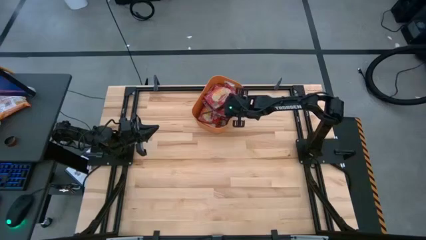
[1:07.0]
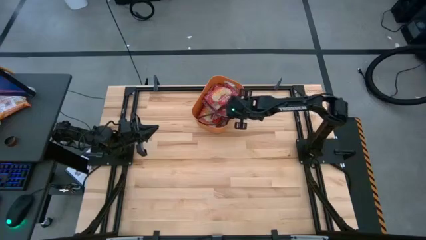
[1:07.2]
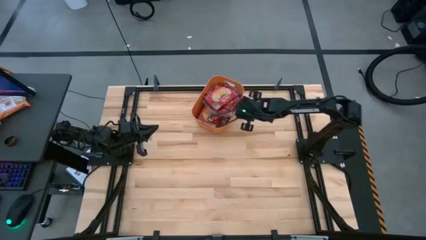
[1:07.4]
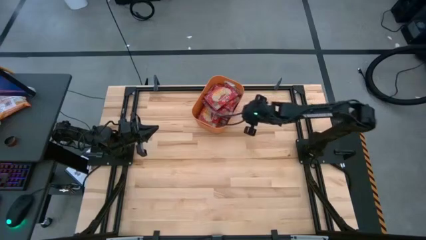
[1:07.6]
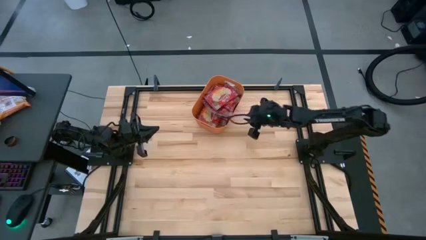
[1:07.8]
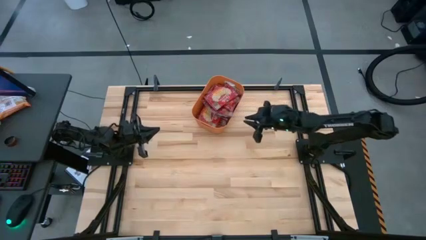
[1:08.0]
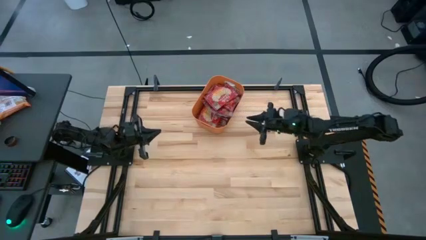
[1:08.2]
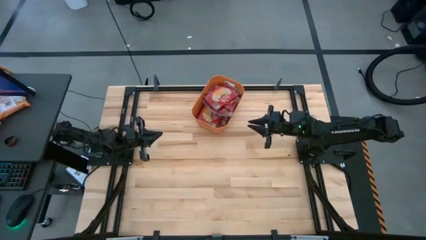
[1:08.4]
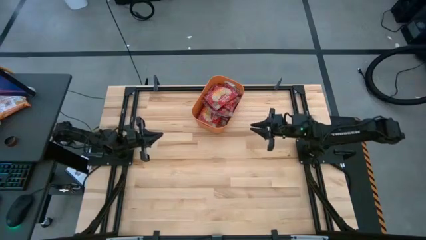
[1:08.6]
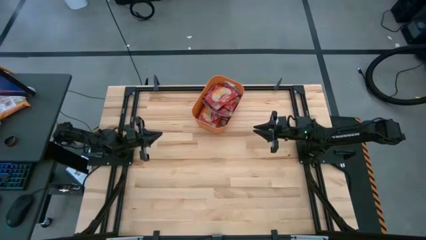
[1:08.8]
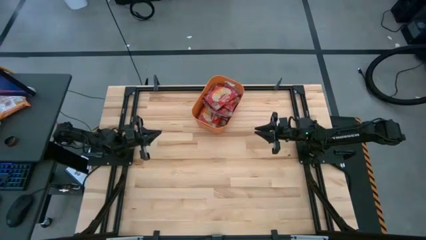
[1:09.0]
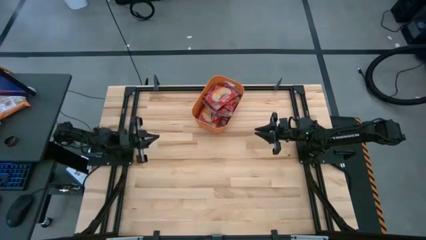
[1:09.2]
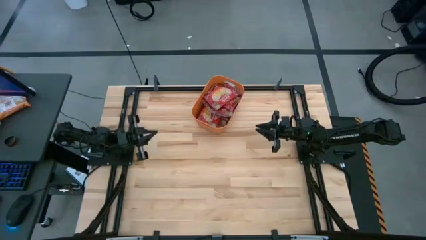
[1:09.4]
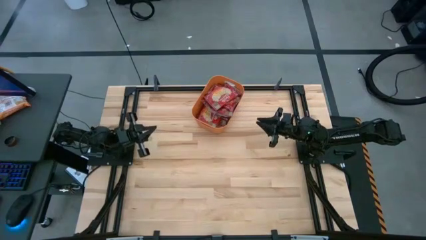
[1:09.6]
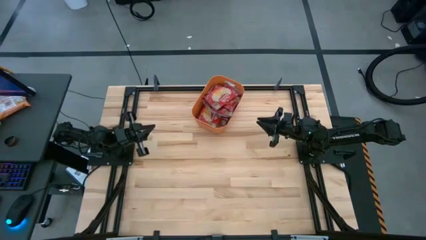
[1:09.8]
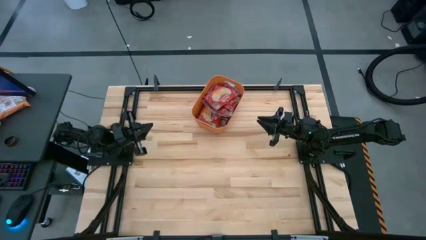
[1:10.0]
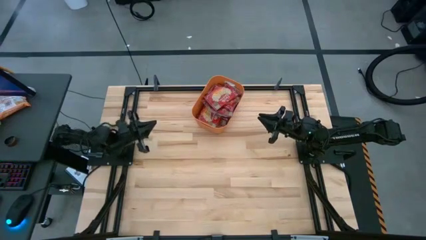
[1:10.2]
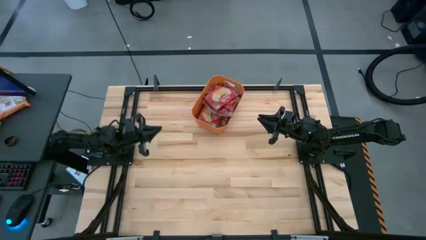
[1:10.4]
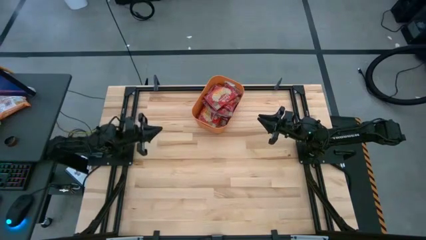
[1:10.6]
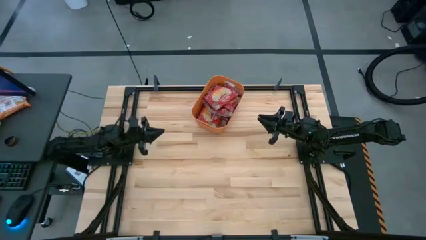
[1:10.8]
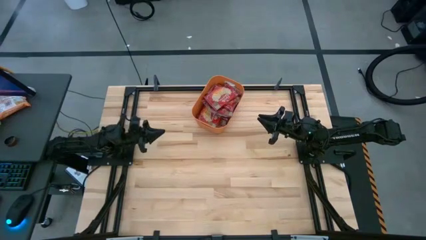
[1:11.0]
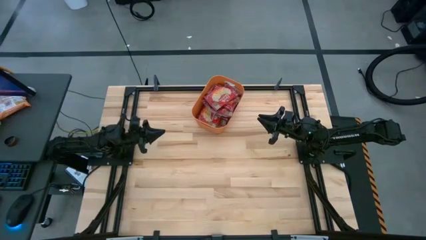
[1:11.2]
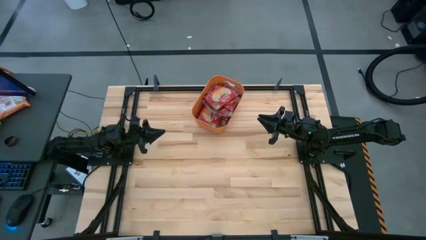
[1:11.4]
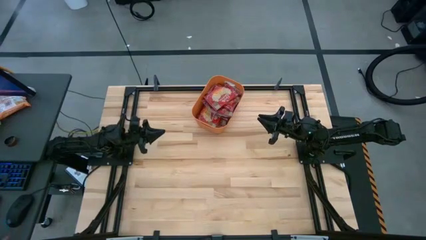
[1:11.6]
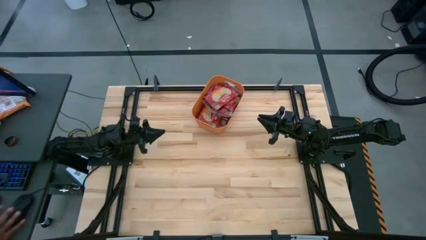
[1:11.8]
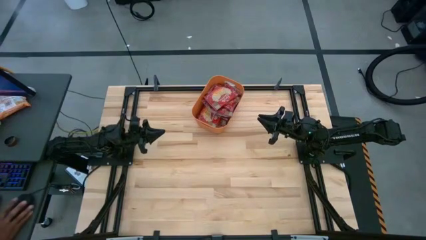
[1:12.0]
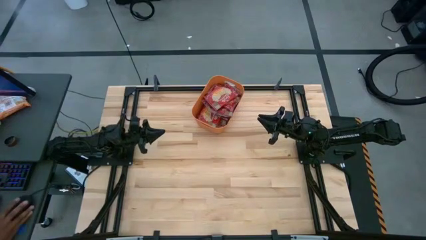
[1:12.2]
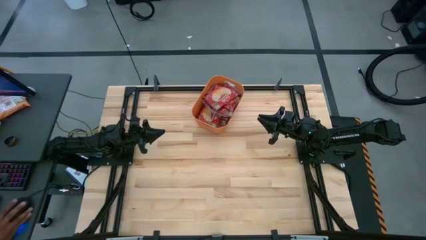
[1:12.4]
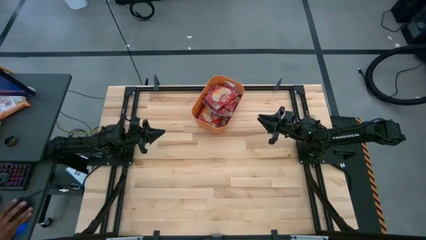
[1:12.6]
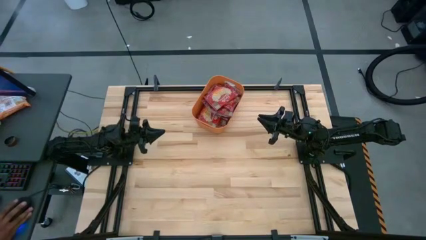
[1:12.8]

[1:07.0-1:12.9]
Task: Sort popcorn bags into baskets
Return to Home Position

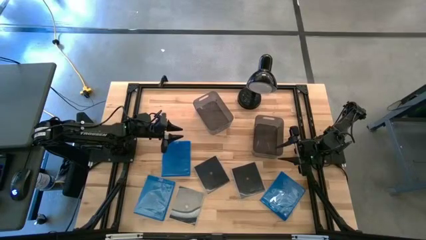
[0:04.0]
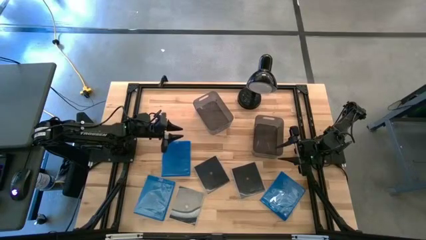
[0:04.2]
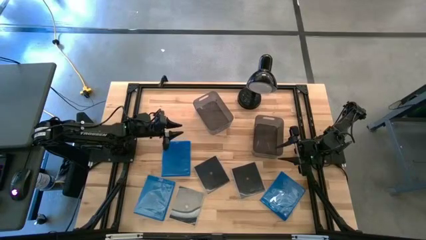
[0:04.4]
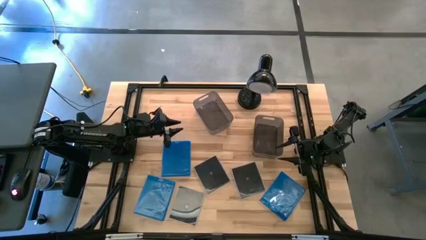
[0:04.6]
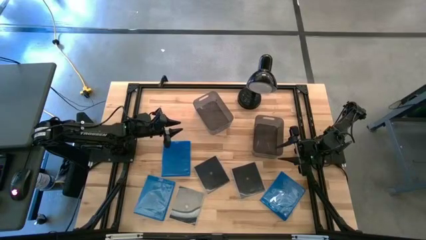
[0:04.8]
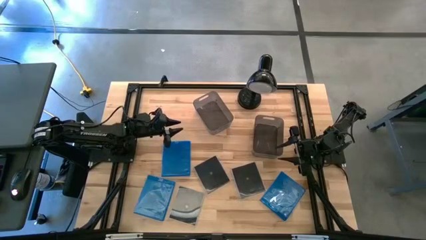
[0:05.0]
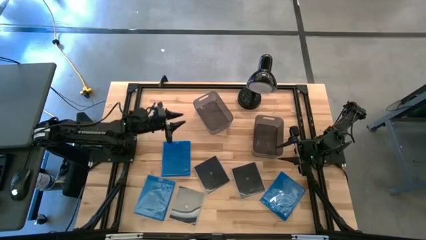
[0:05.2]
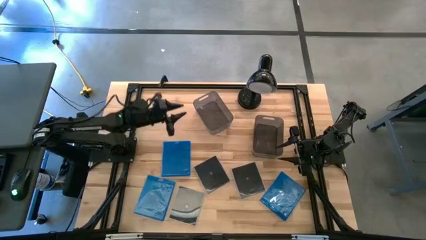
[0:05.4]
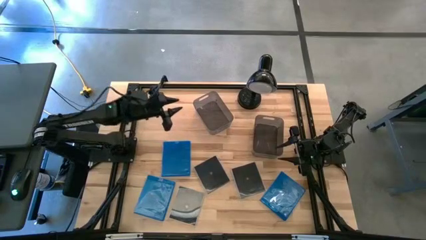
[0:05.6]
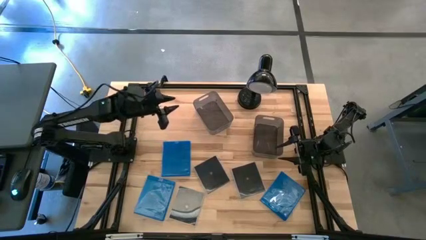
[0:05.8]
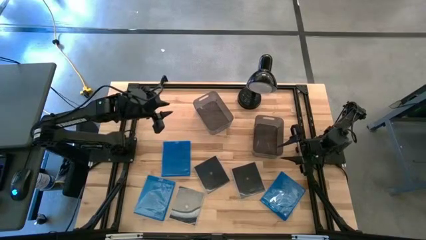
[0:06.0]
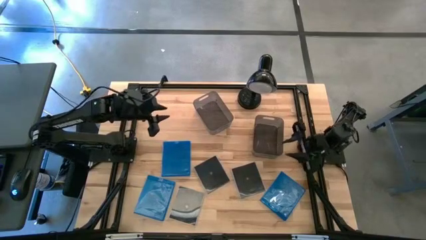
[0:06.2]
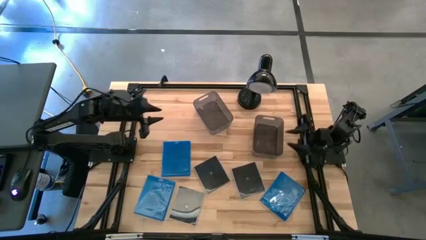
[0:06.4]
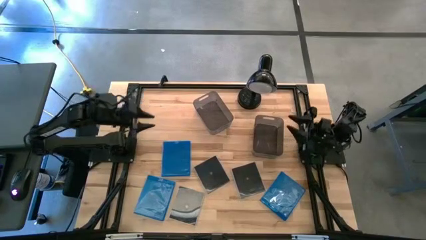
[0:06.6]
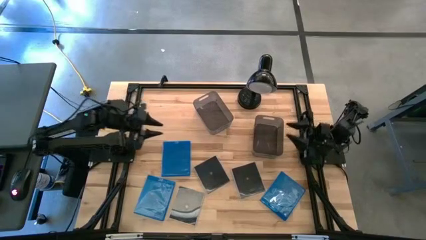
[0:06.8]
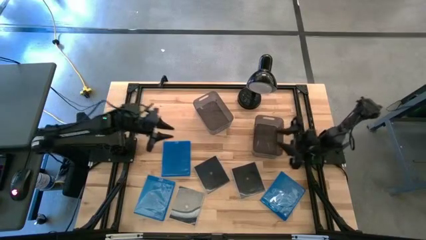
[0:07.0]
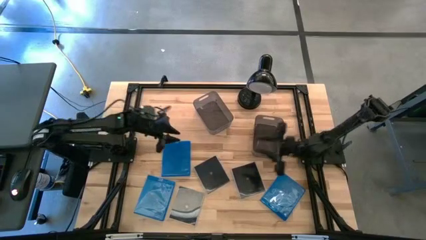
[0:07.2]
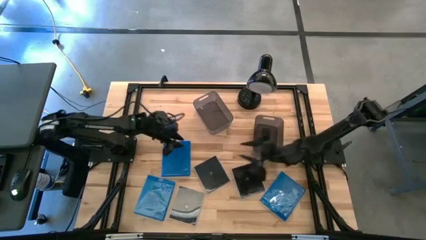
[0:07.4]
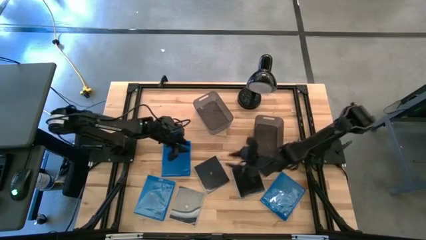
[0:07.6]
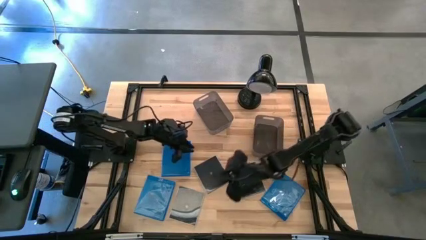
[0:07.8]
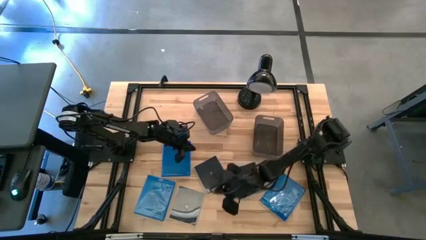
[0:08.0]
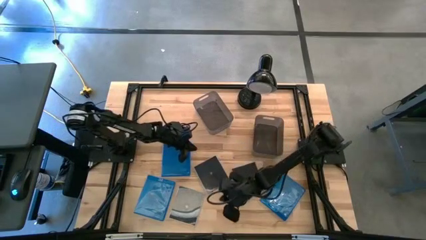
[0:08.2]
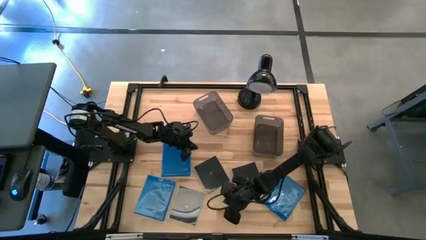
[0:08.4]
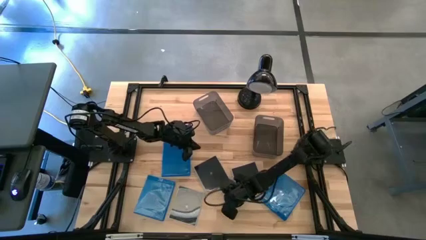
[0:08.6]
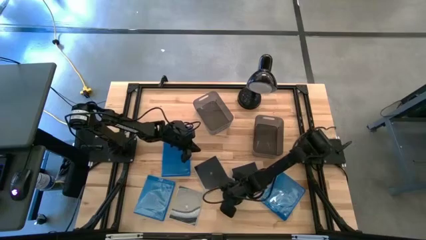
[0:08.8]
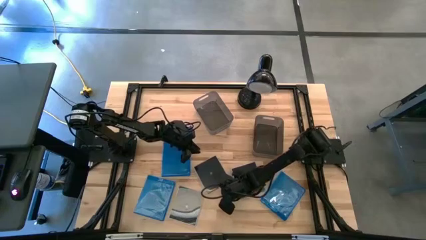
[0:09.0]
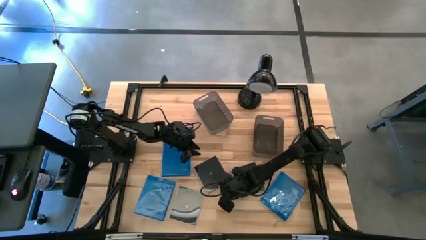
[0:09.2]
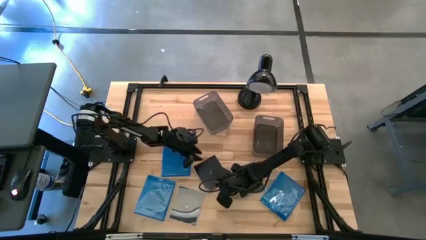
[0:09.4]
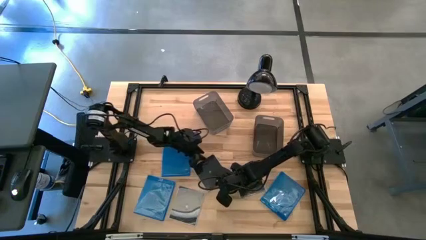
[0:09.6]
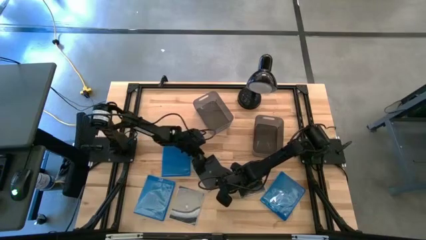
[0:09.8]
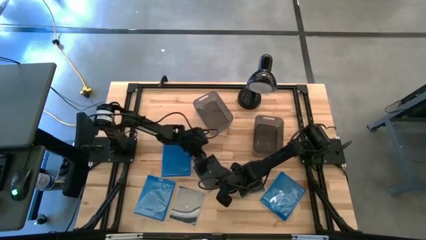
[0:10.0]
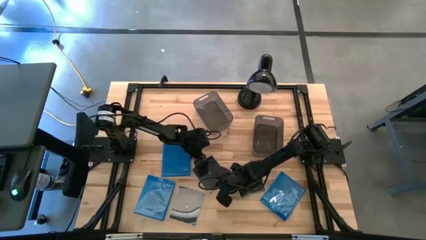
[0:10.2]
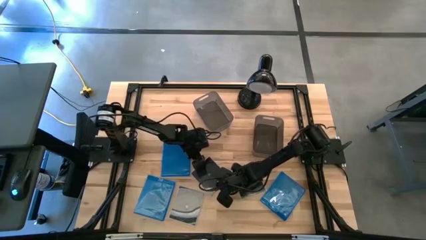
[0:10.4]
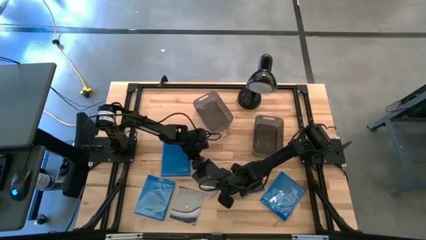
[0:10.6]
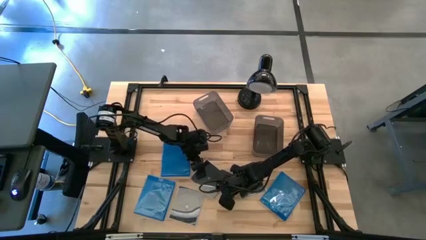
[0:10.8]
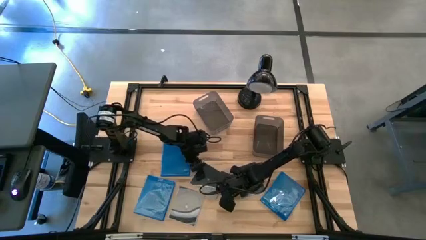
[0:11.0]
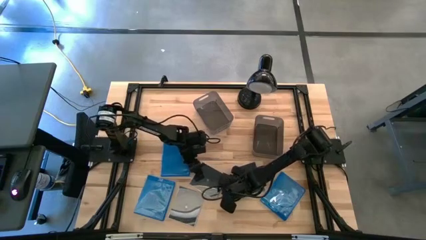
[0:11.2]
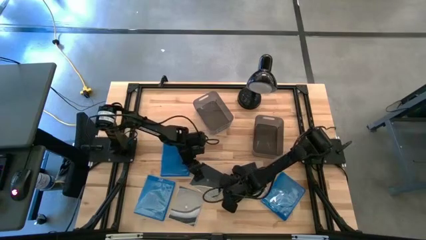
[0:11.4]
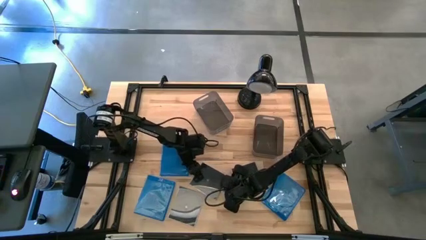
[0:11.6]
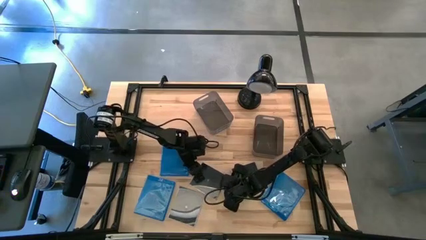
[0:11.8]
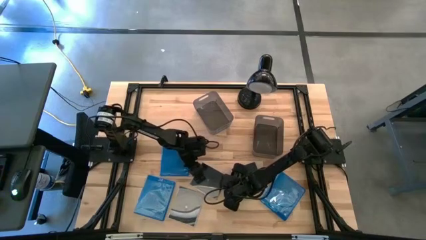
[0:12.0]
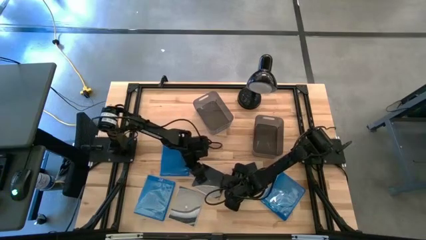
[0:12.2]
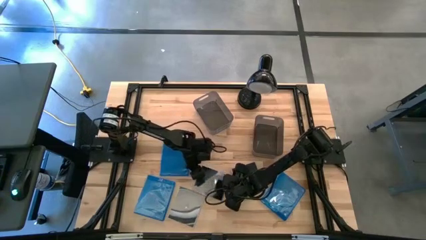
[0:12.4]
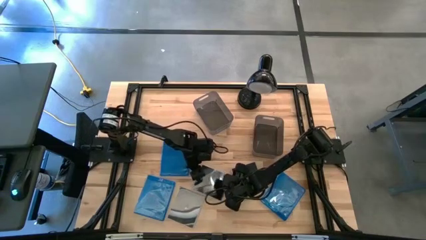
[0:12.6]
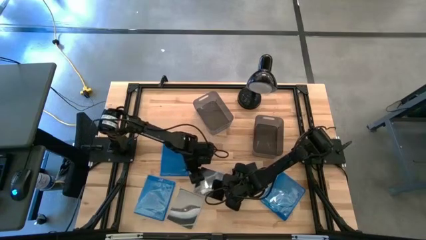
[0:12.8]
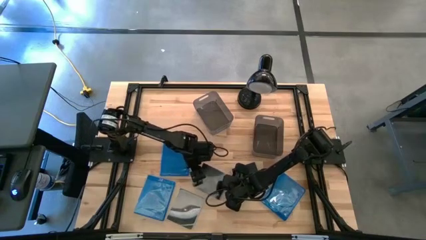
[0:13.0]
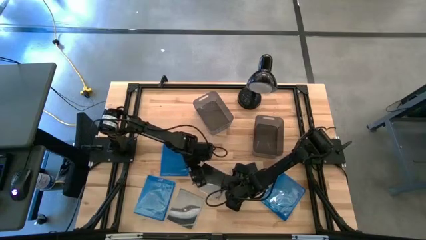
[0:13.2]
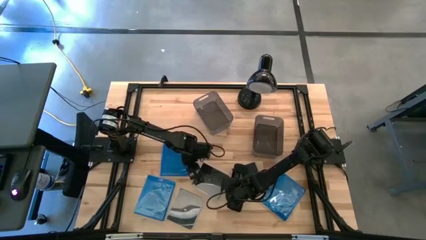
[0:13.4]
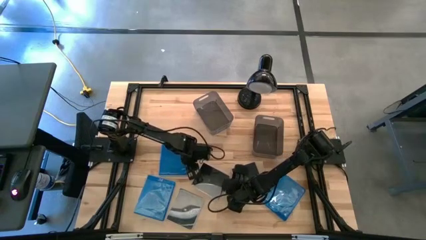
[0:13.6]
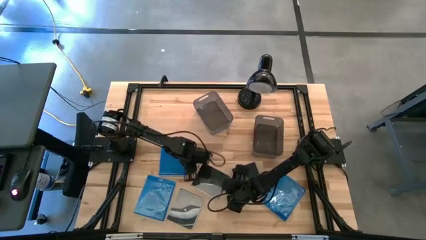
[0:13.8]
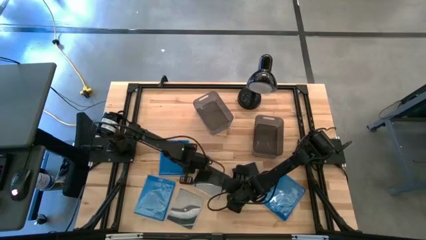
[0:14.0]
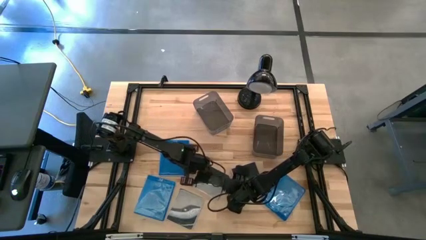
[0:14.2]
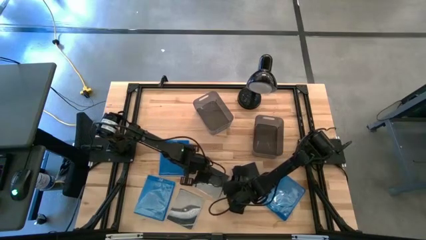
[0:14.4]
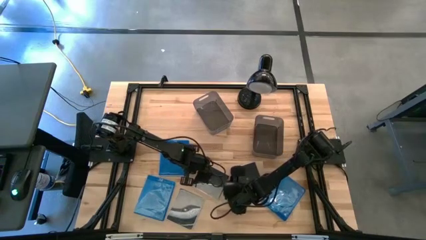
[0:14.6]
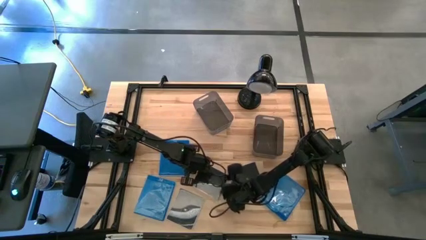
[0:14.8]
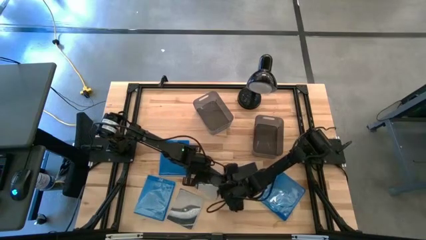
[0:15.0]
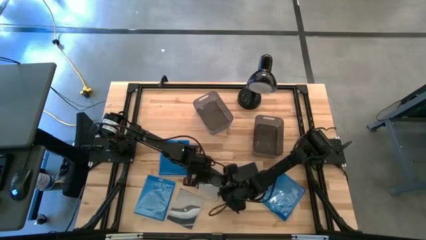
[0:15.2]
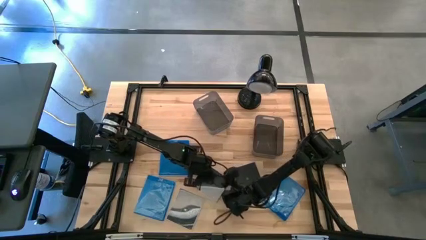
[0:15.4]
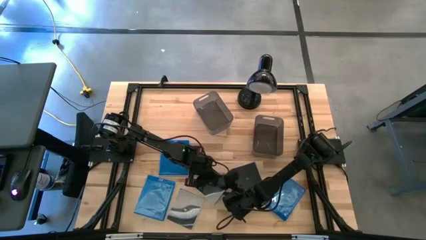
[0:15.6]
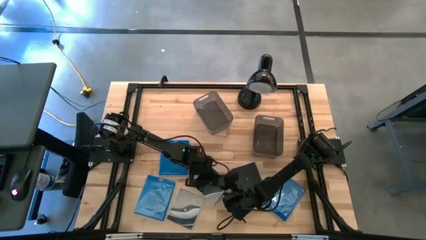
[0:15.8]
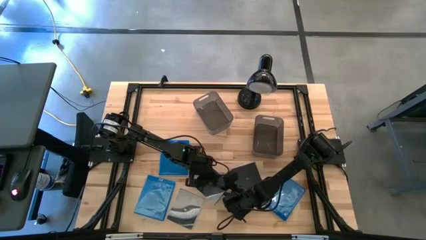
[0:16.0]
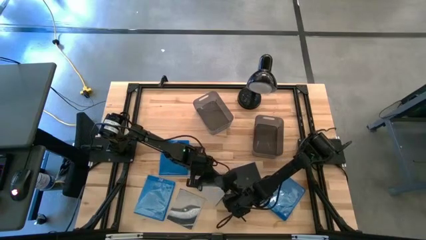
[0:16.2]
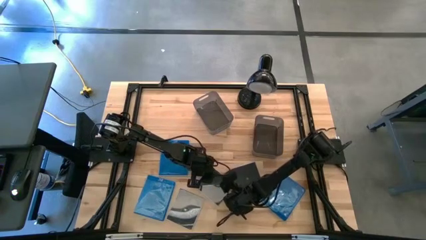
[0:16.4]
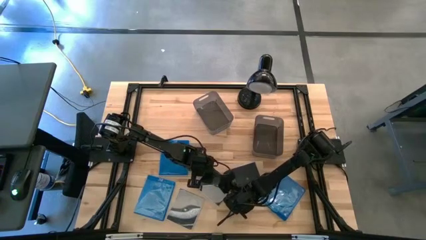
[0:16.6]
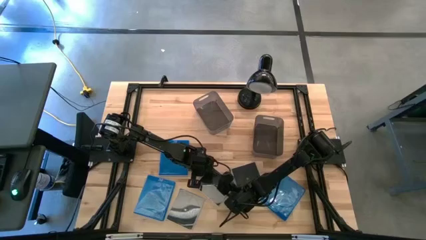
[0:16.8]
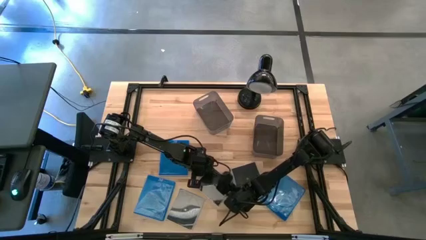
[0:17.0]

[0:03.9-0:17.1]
Task: Pick & place jewel cases by type
Put the middle black CD case into the right black bin
